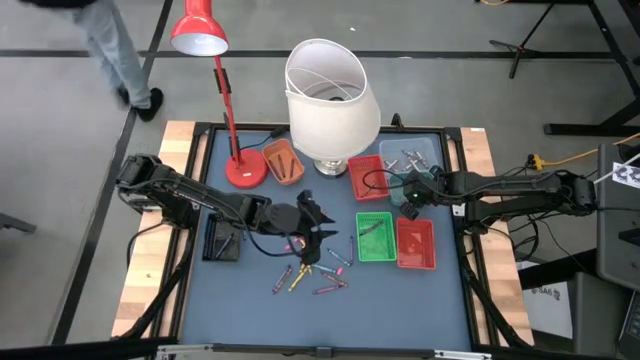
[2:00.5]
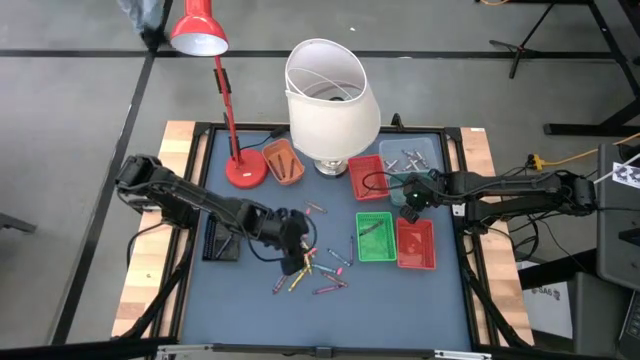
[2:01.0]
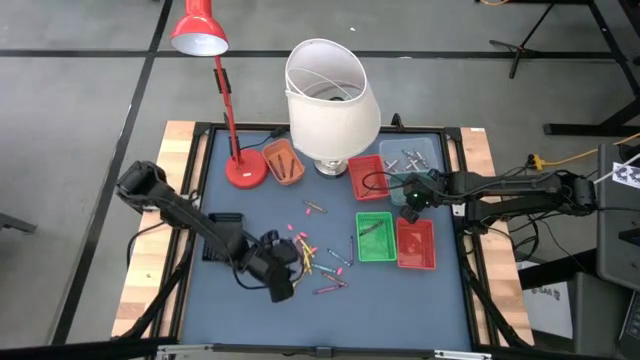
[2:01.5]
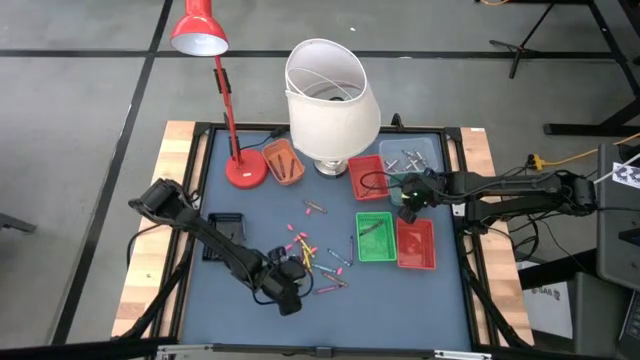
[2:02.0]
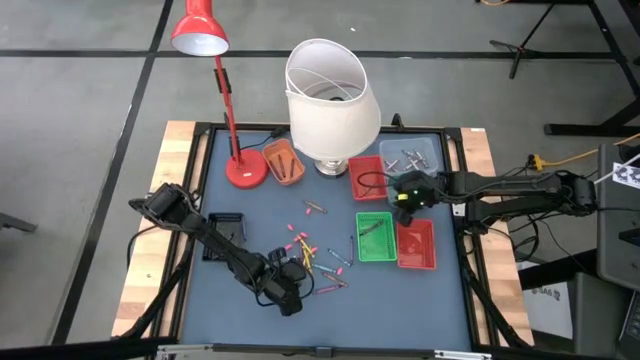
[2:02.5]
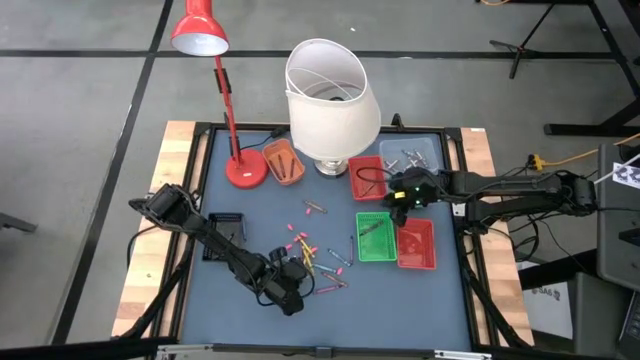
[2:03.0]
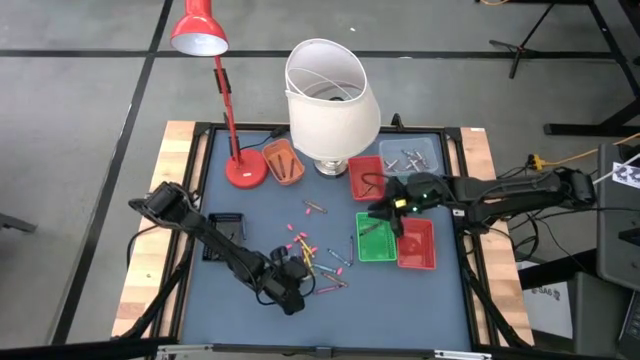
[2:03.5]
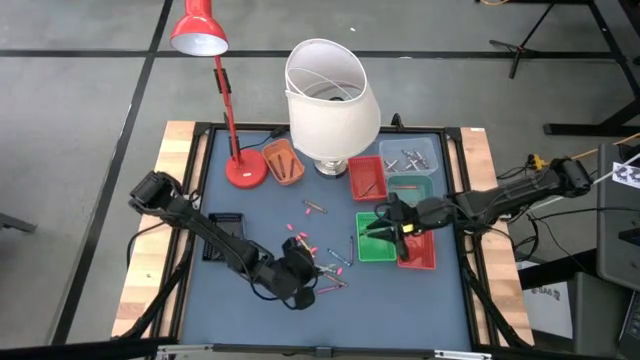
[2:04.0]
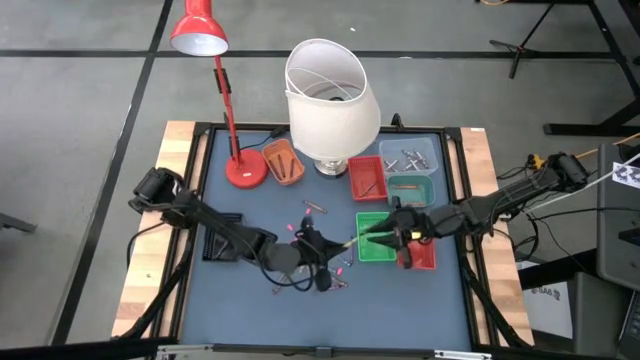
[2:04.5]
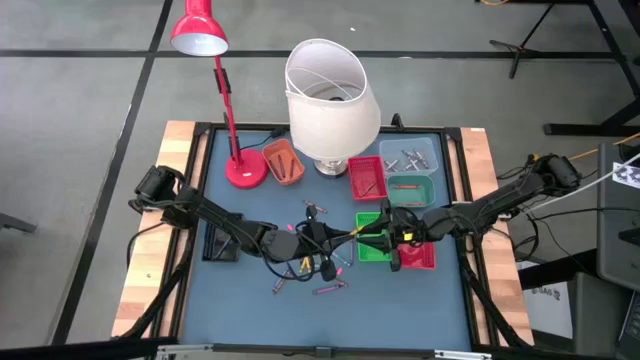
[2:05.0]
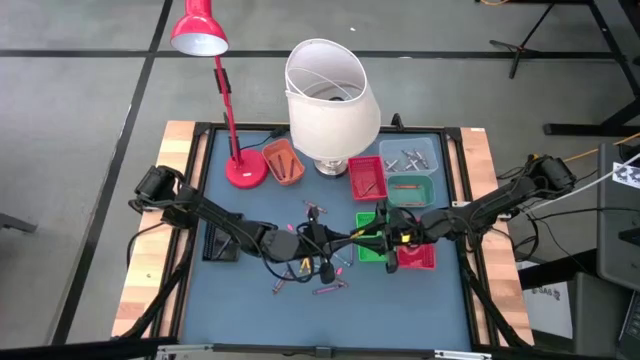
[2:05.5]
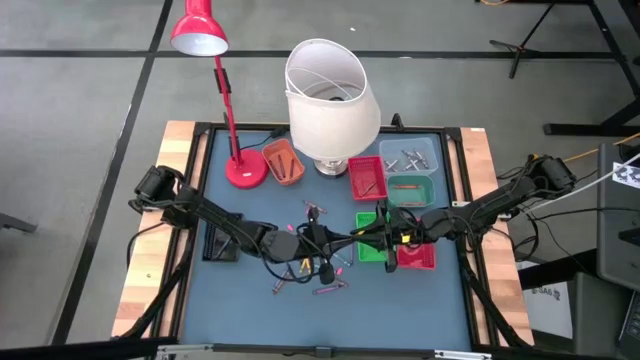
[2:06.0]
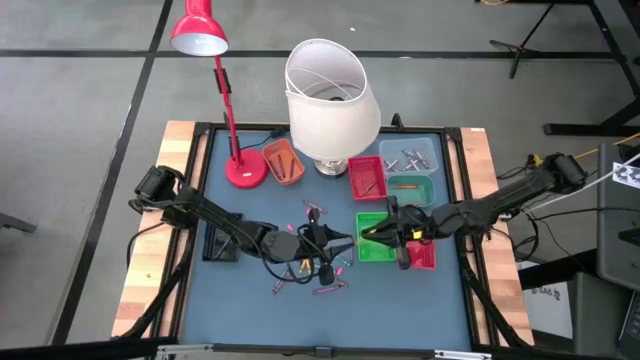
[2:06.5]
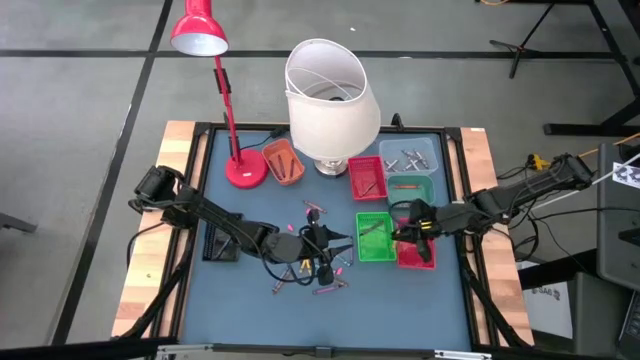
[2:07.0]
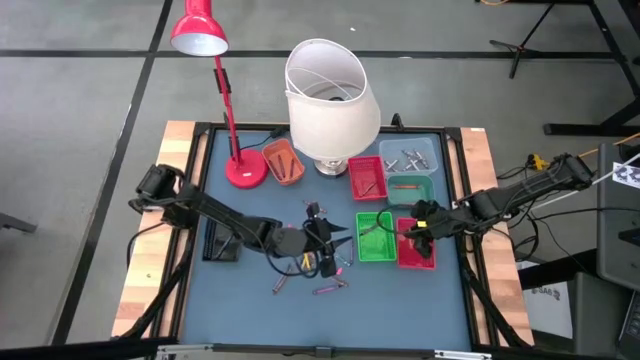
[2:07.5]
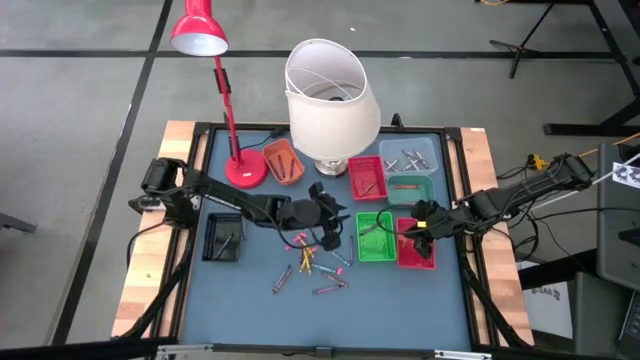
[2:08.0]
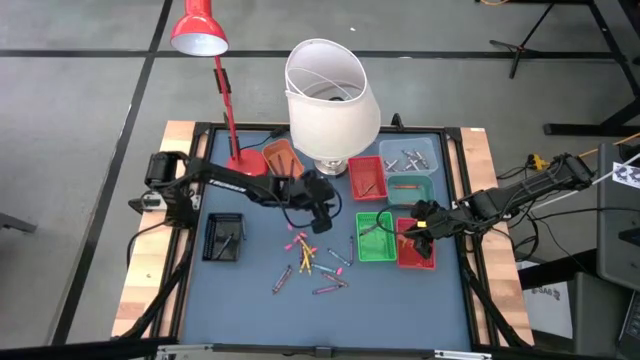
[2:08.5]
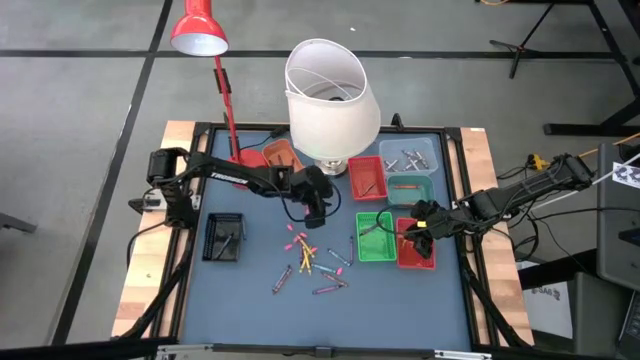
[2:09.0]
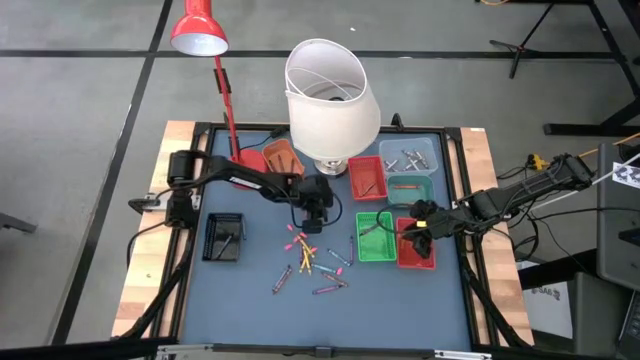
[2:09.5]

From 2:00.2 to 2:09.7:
Task: Sort crayons
Put the yellow crayon into the bottom dark orange bin

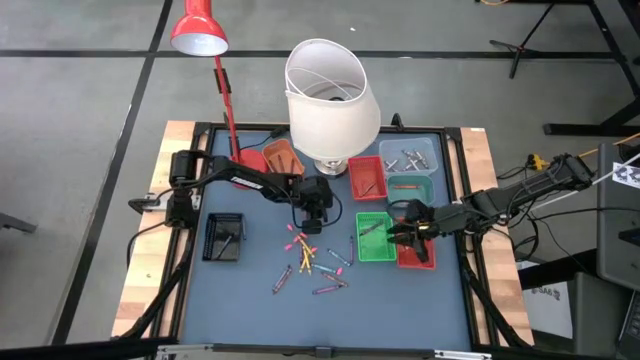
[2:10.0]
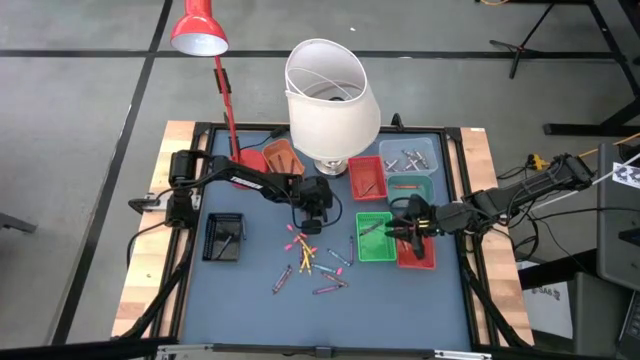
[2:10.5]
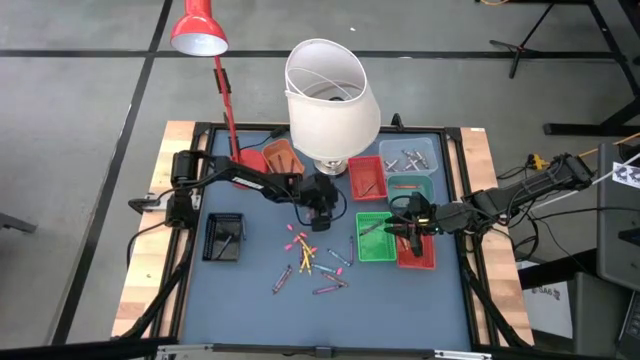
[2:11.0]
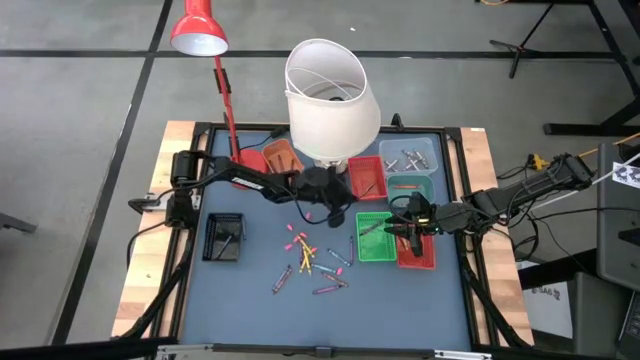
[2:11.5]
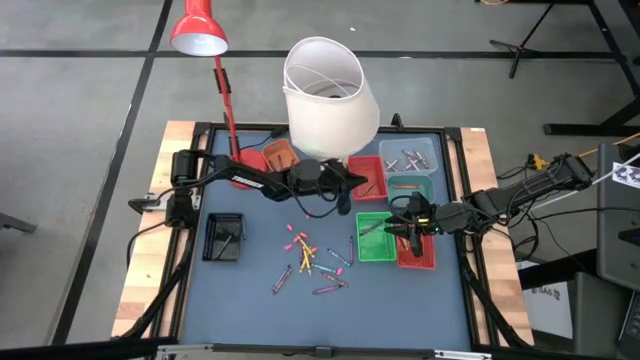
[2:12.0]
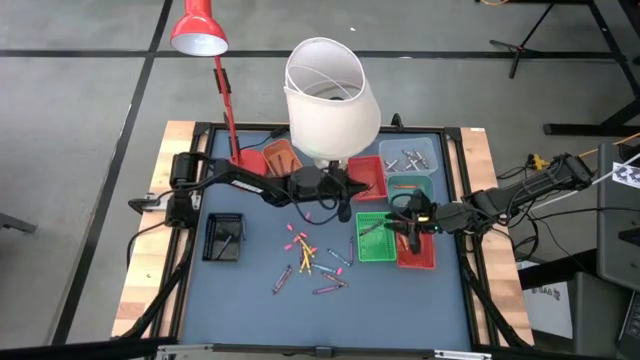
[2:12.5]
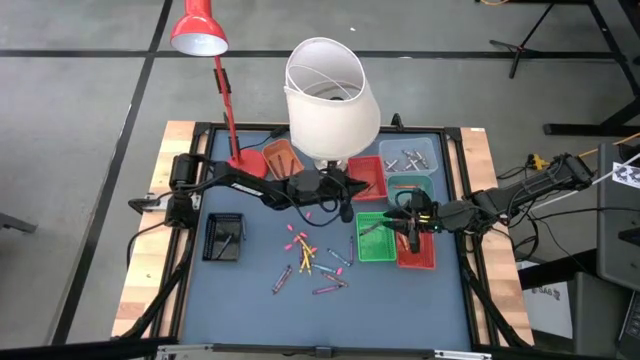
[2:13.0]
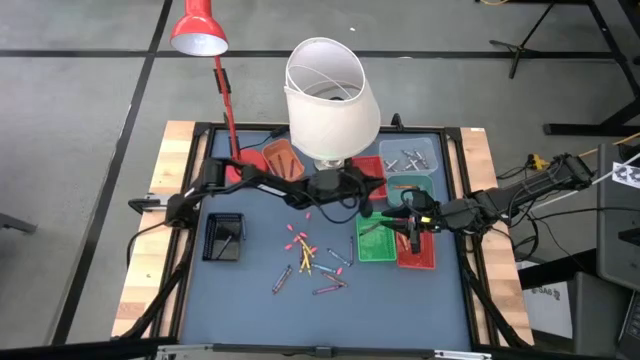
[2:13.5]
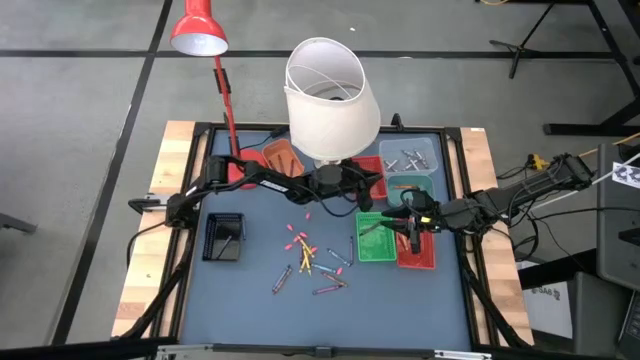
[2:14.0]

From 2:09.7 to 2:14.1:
Put the brown crayon into the top dark orange bin

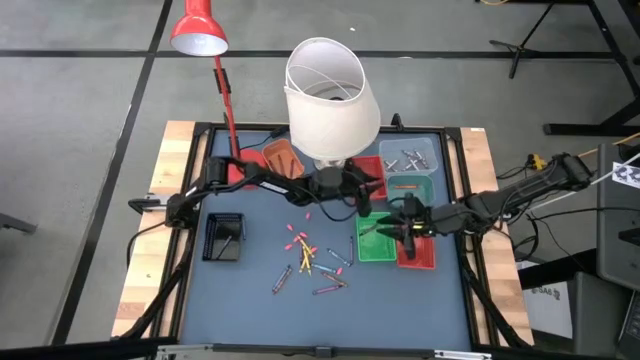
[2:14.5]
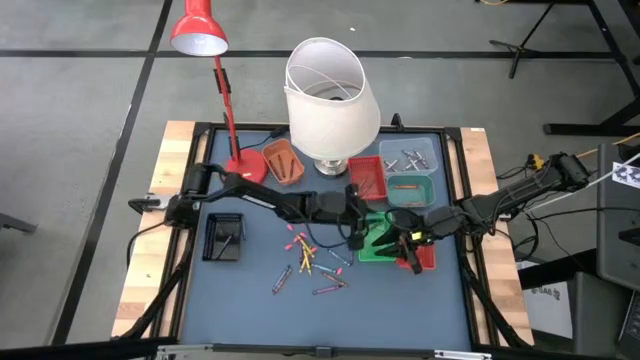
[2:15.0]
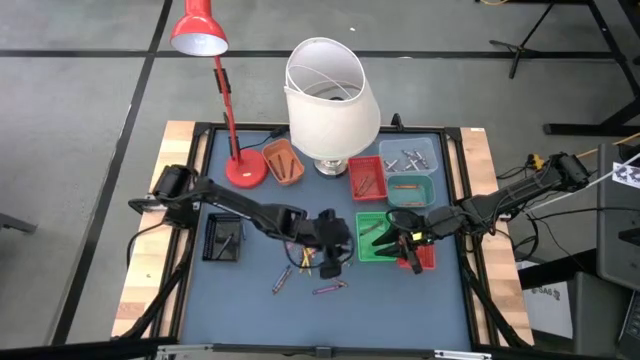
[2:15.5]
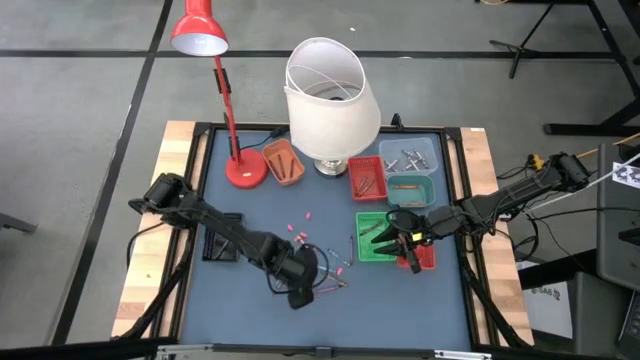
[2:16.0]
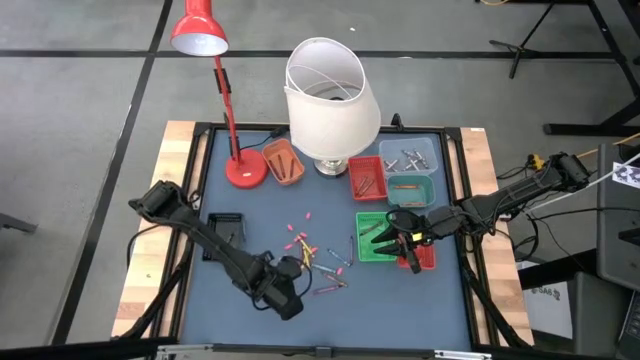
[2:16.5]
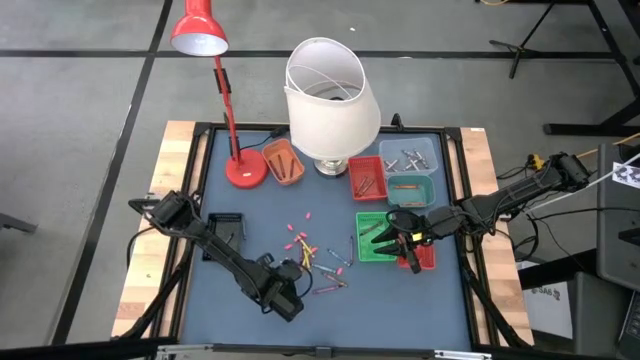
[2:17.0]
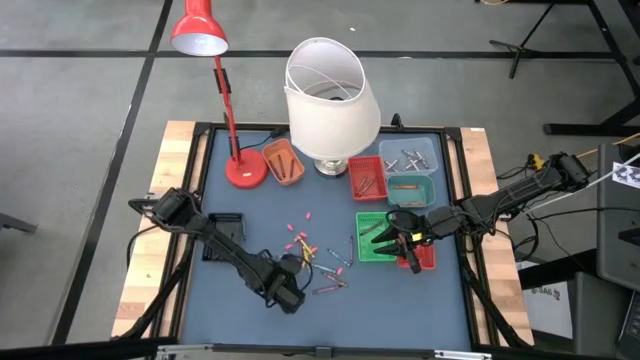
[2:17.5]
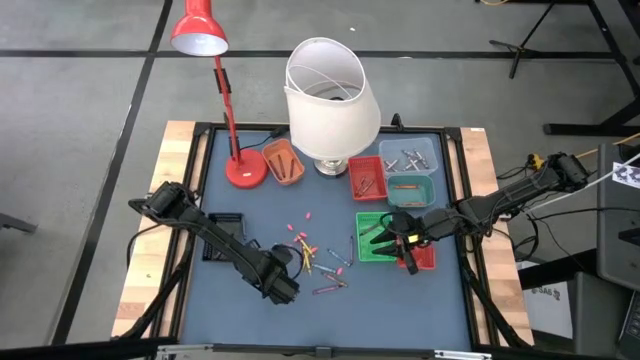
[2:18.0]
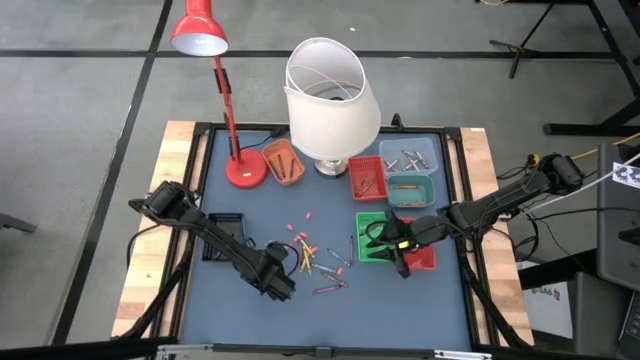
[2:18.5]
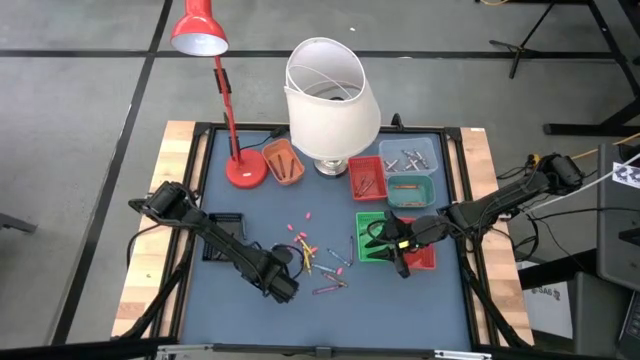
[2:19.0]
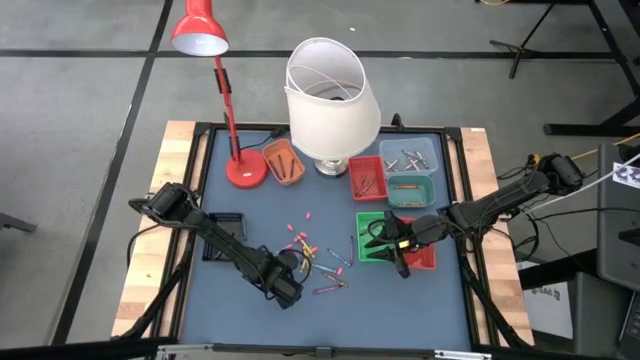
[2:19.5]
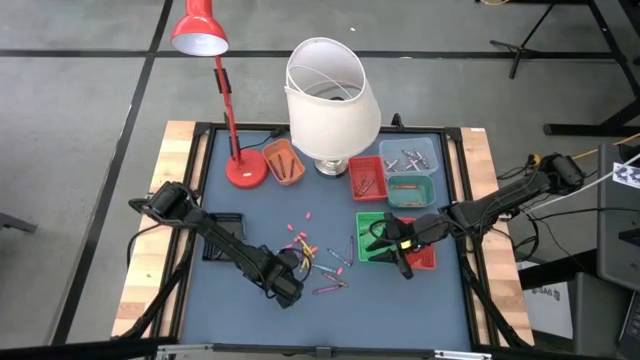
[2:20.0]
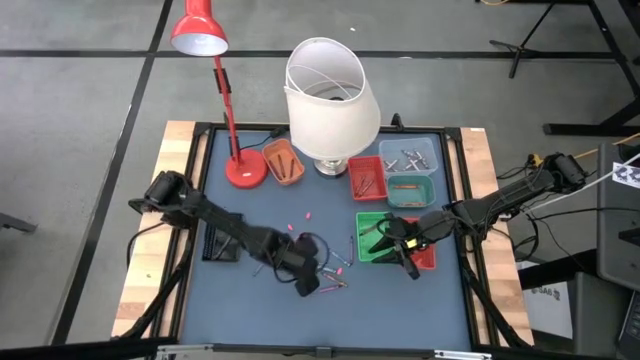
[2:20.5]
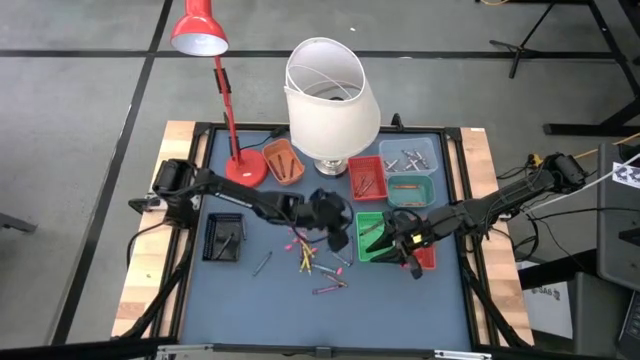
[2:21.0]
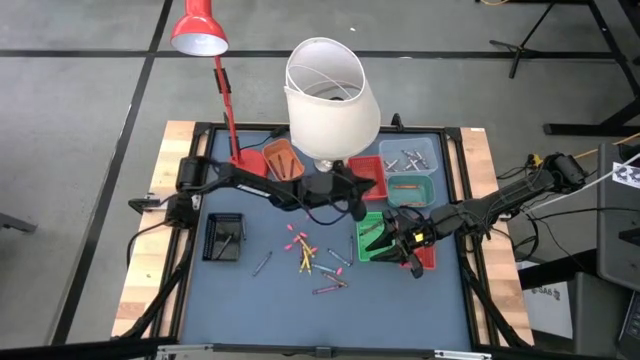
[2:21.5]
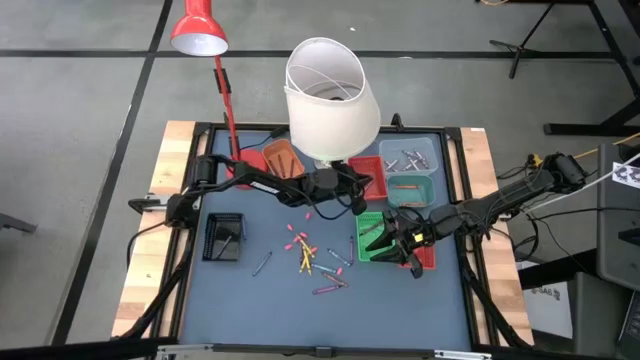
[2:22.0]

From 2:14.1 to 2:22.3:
Put the brown crayon into the top dark orange bin
